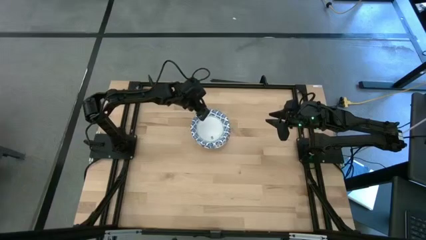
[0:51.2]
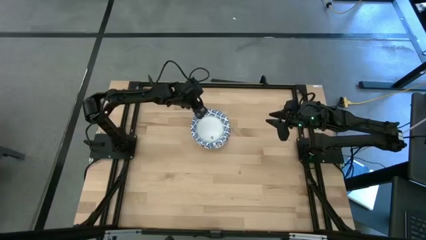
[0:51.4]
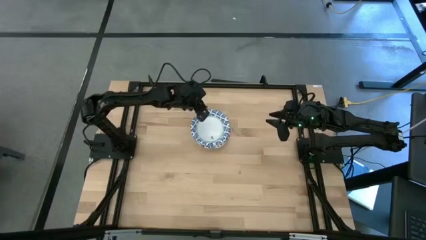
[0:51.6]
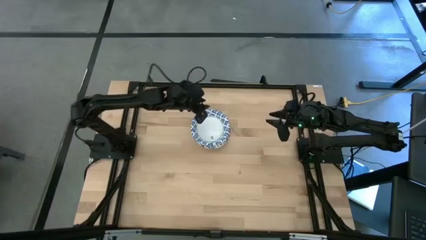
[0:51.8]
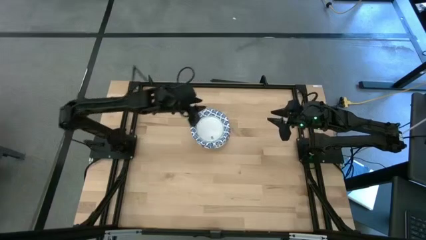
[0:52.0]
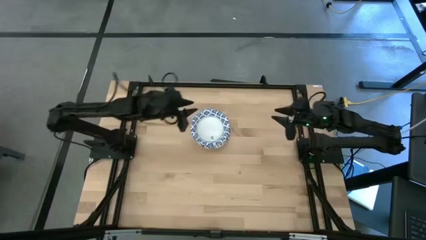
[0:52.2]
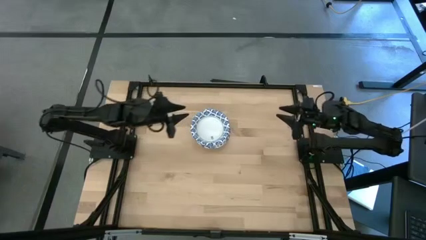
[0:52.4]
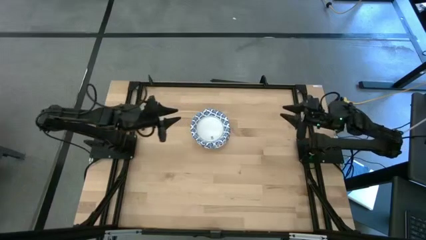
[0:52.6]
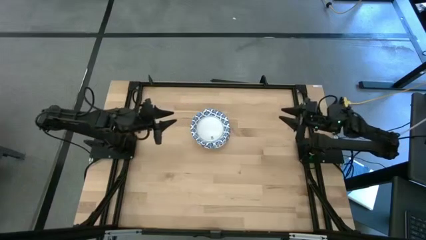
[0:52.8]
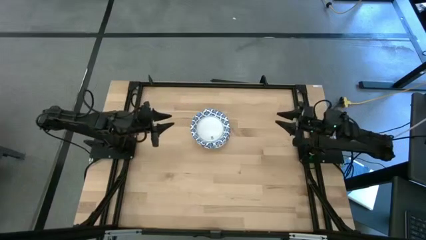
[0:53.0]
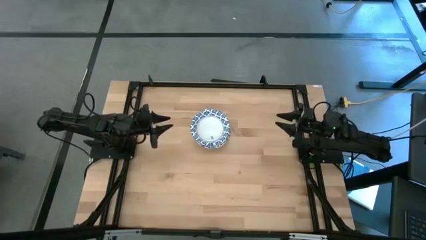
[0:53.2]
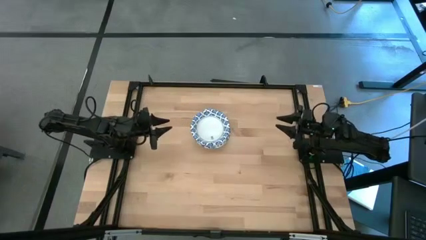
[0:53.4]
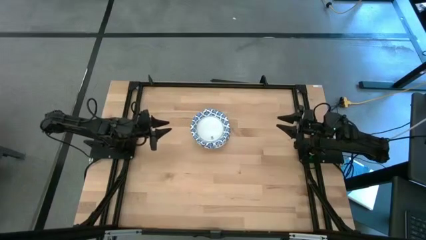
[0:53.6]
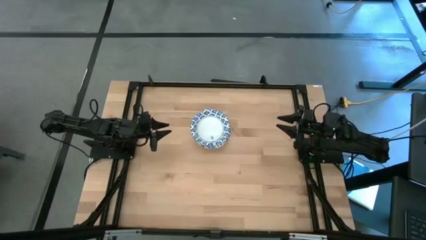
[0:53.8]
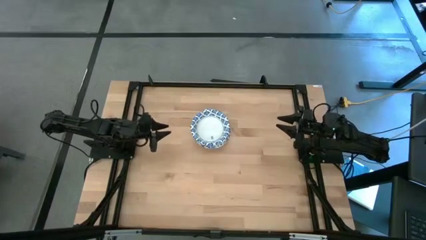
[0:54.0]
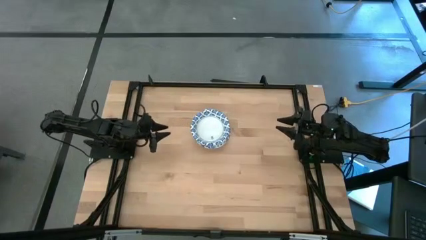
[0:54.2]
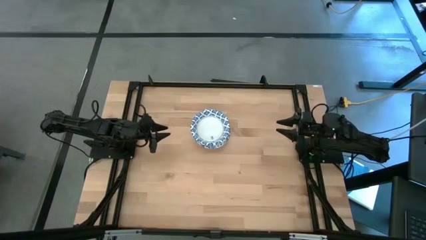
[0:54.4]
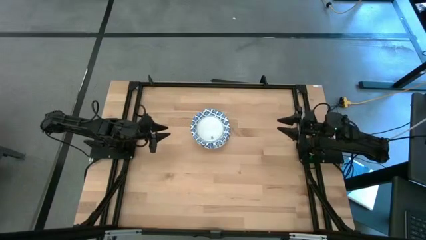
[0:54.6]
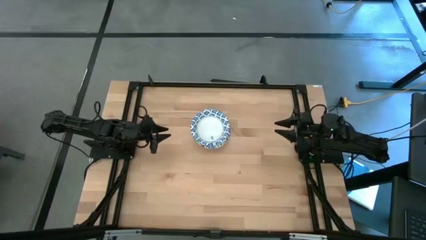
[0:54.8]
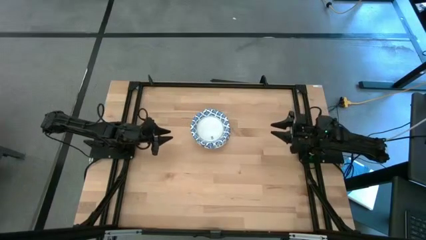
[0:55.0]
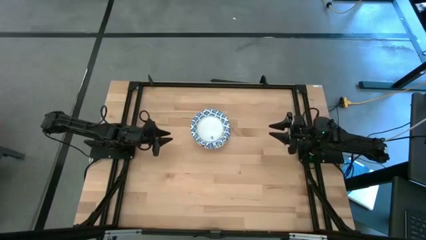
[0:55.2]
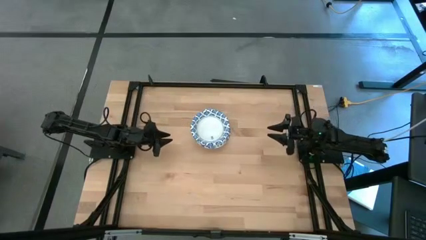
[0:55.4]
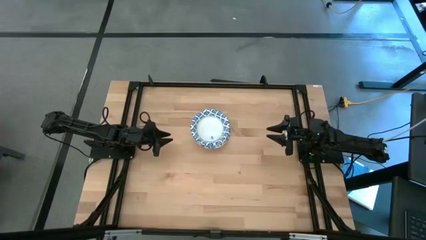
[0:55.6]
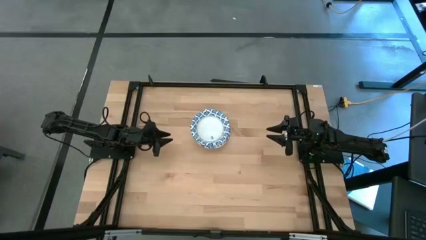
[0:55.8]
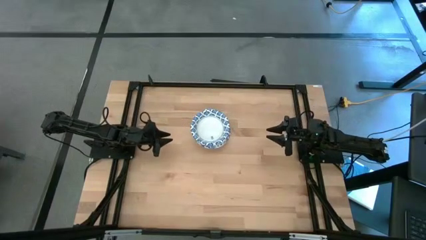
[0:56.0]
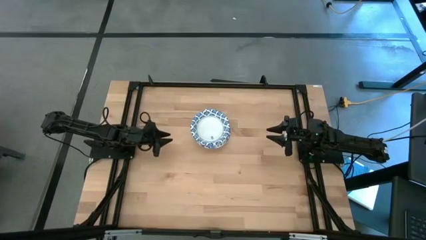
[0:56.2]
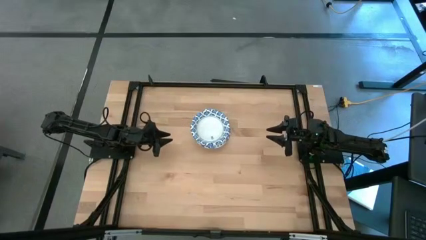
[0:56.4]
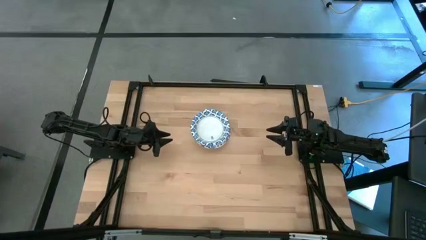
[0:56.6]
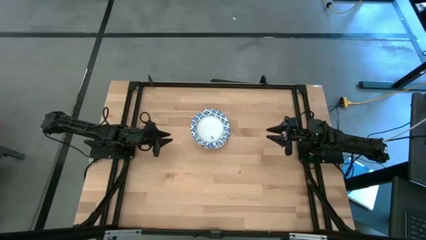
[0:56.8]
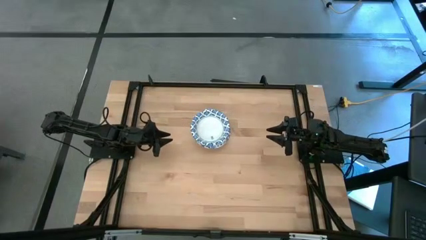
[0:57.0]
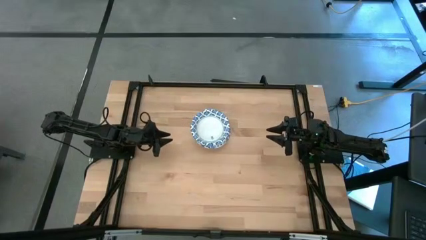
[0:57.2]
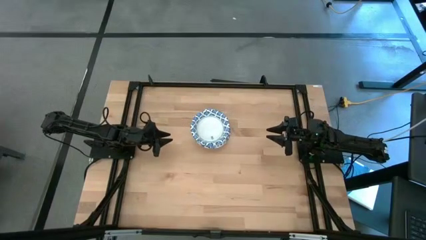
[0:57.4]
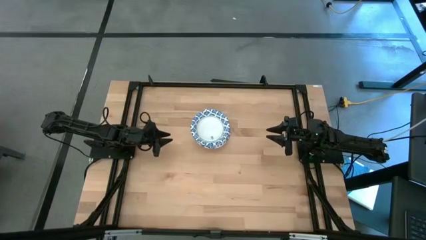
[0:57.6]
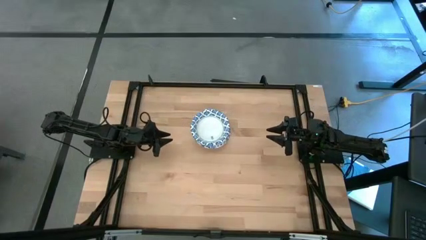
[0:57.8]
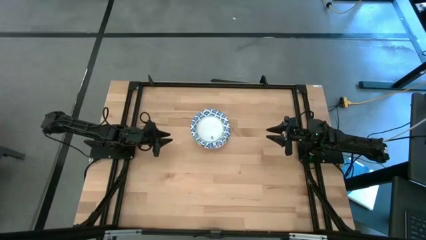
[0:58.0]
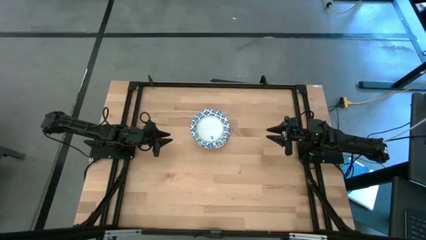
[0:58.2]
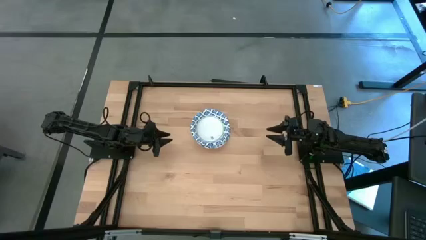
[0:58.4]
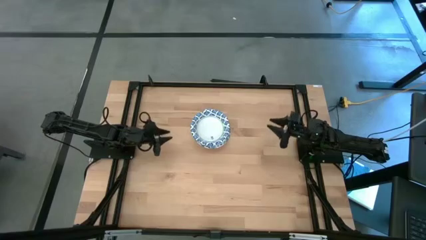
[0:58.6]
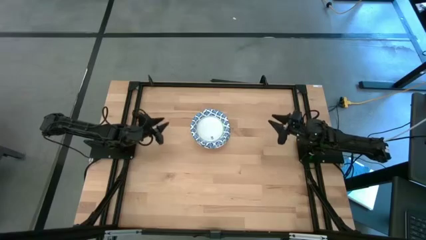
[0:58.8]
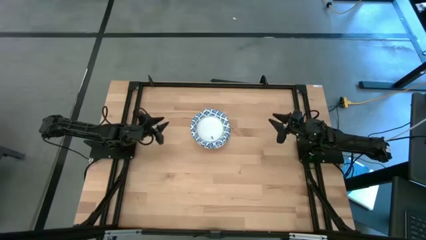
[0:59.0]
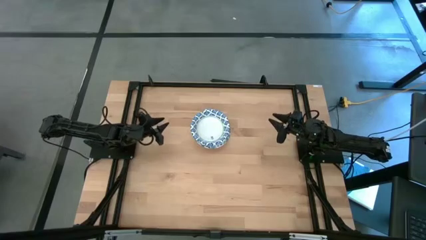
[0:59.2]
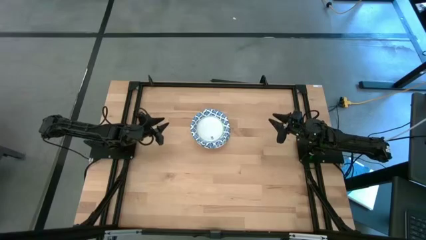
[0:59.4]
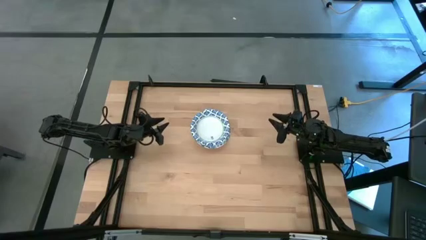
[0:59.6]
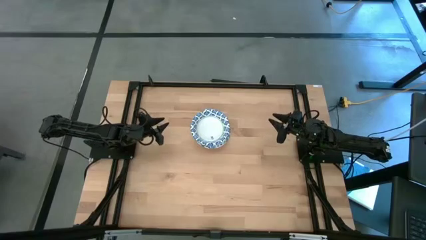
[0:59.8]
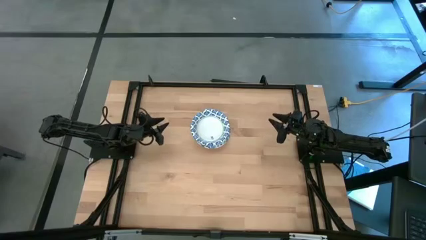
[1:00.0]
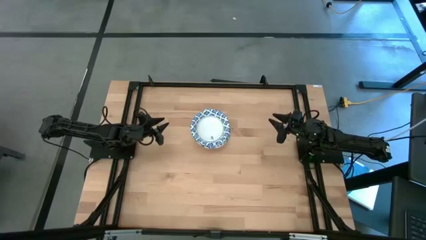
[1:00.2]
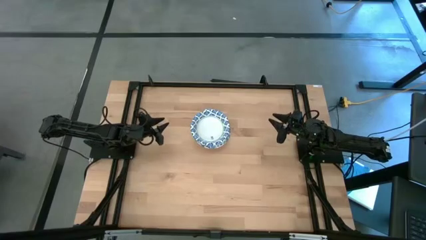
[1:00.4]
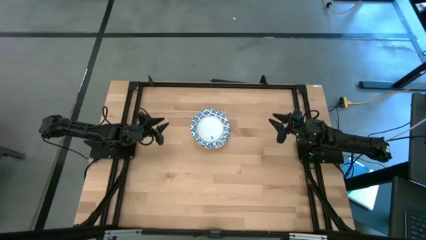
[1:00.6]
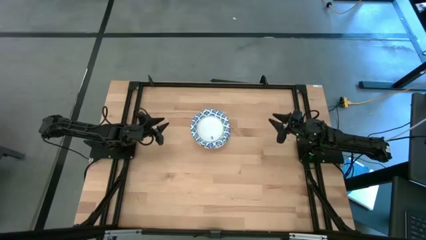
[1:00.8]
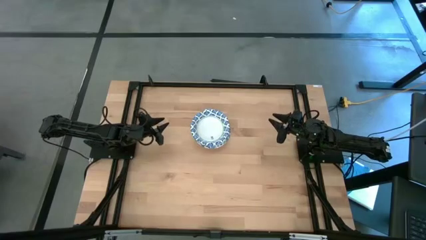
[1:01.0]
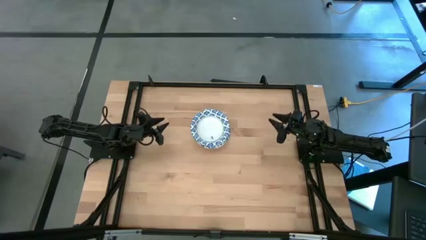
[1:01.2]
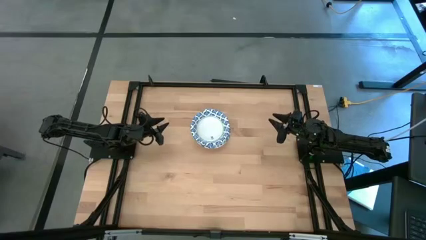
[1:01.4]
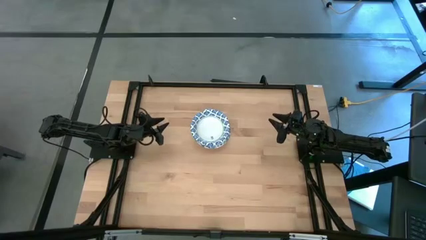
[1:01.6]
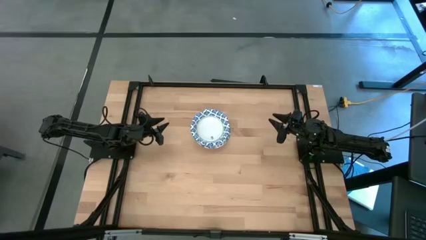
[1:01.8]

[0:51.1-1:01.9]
Task: Nest bowls inside each other
Return to Home Position

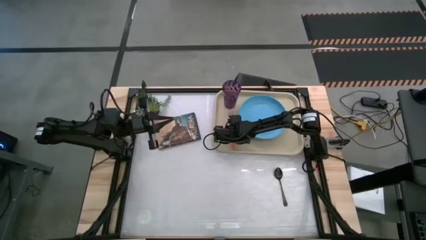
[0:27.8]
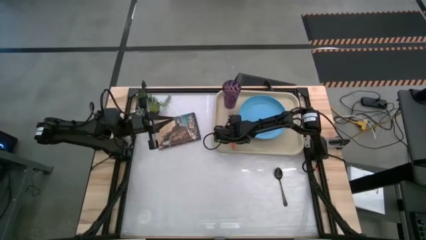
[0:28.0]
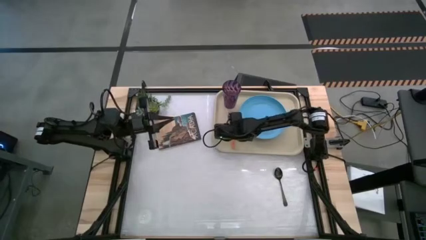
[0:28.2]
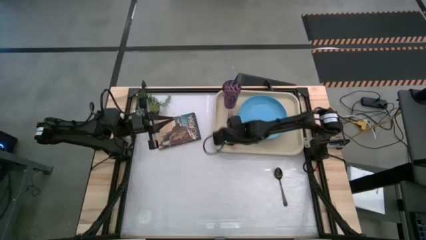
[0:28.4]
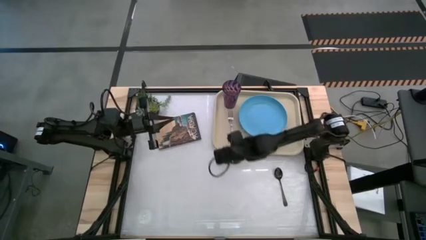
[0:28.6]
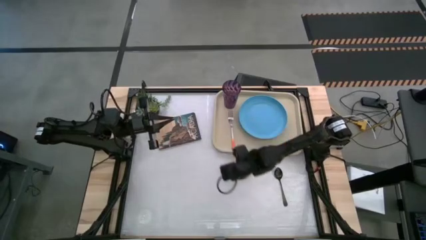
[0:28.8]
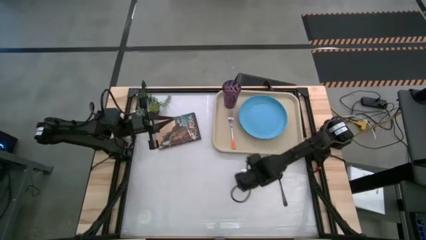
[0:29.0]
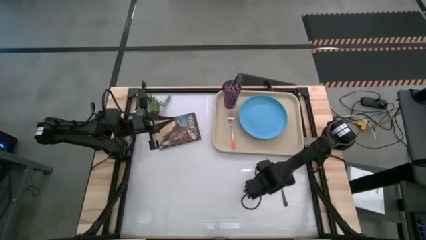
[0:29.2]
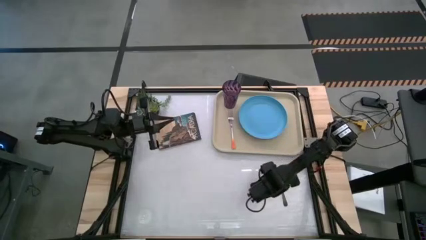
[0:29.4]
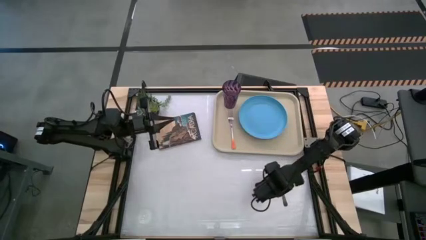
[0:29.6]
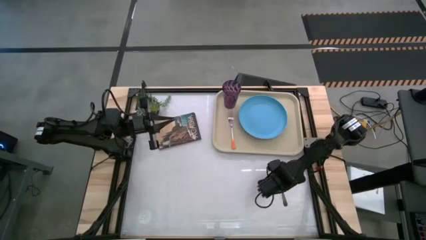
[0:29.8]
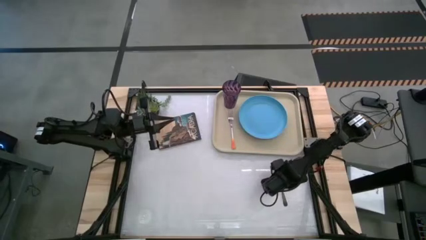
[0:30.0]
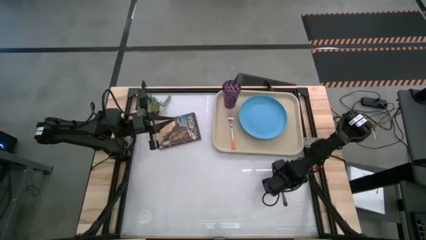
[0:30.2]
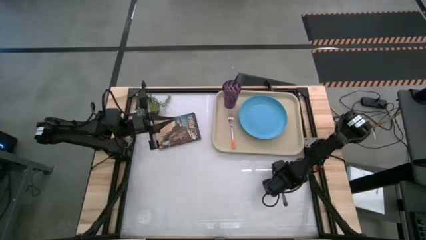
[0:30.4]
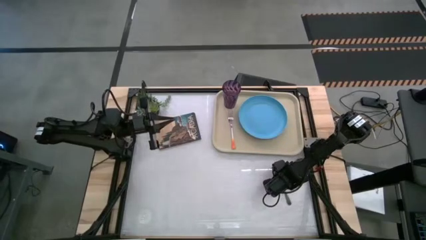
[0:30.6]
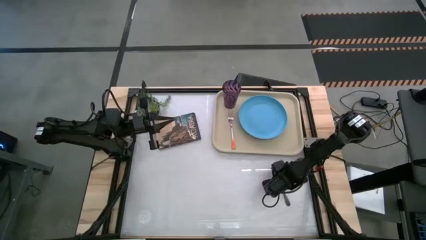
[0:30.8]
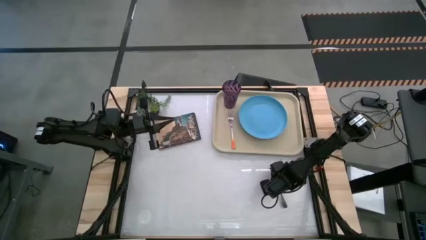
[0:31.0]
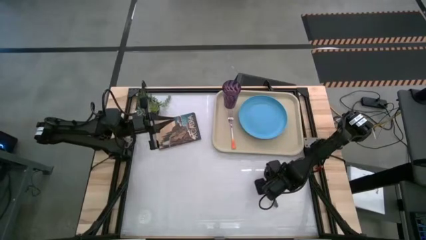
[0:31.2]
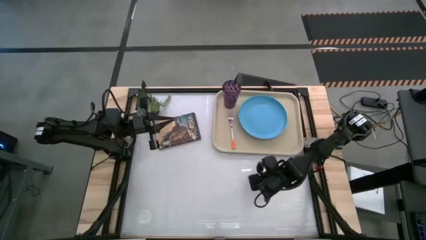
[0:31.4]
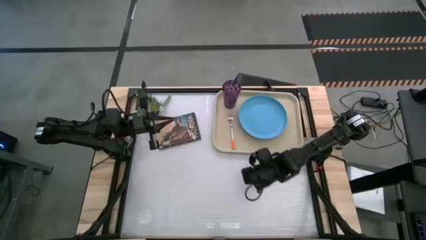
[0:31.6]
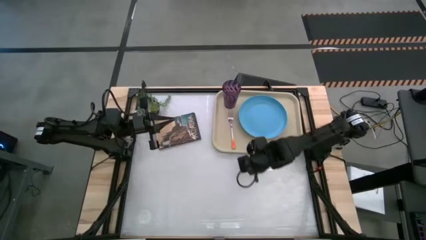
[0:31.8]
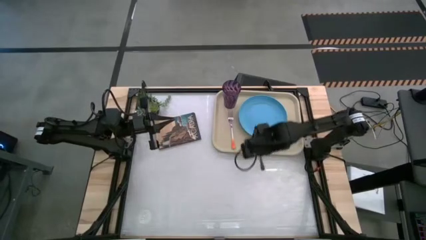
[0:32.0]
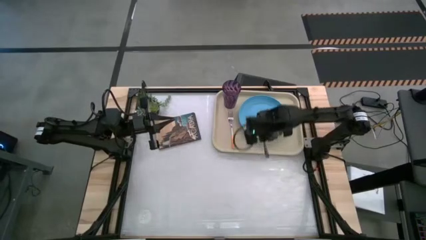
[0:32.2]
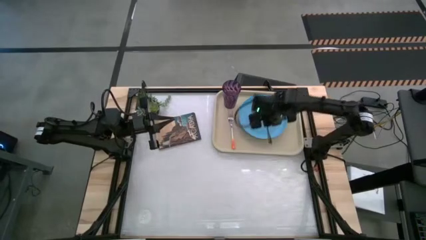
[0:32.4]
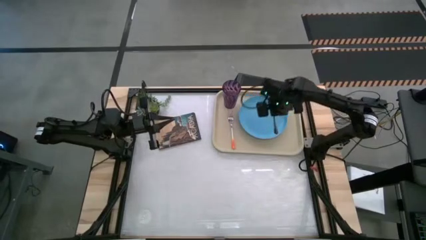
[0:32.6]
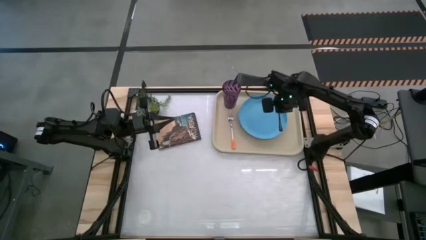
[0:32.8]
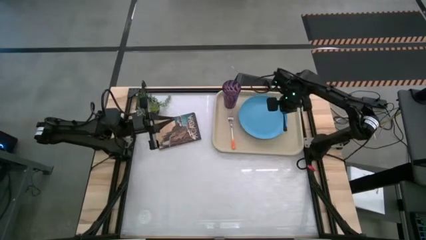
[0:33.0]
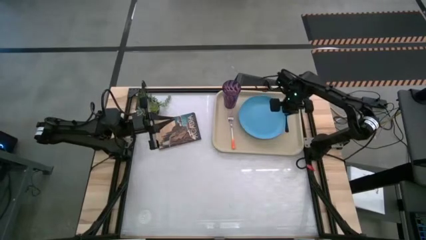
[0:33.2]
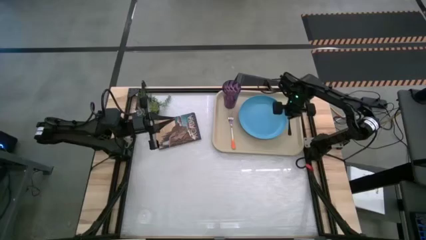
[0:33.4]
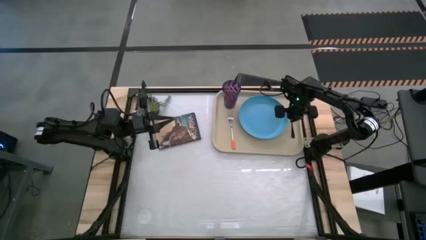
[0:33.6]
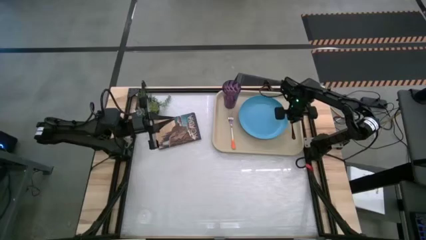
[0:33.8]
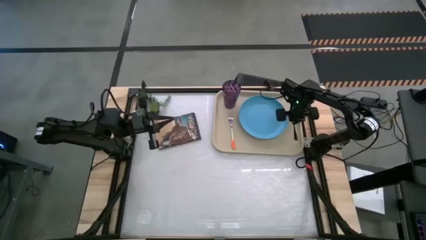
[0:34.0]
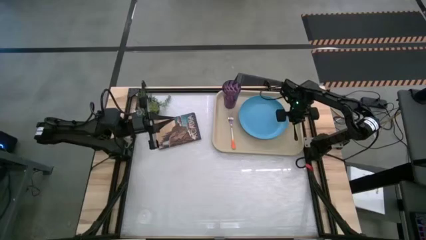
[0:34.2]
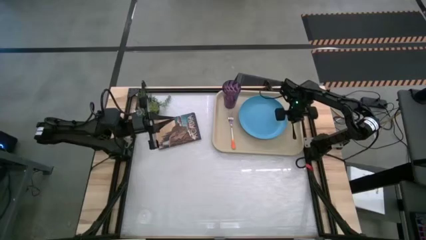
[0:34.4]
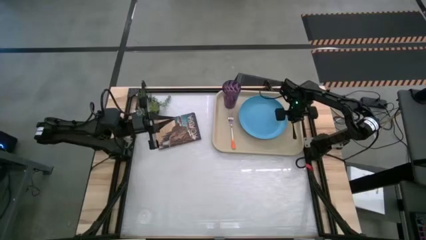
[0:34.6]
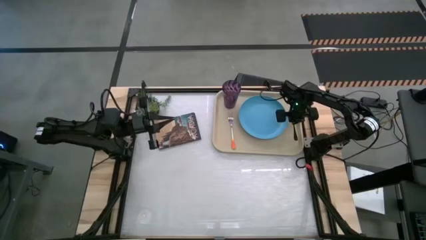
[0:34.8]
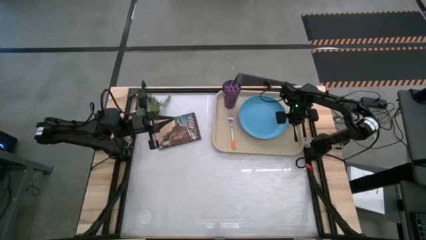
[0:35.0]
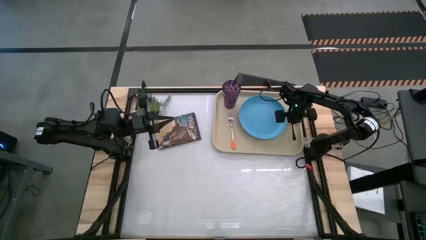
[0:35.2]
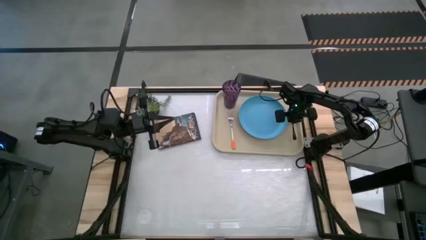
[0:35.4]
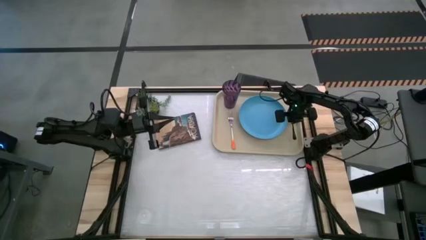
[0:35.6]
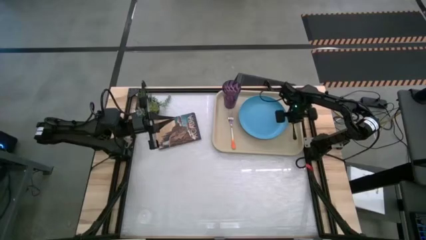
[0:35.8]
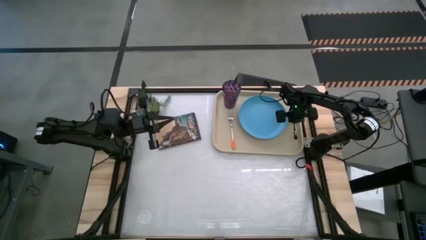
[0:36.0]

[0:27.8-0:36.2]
Task: Pick and place plate/cup/fork/spoon on tray
Put the black spoon on the tray to the right of the blue plate
